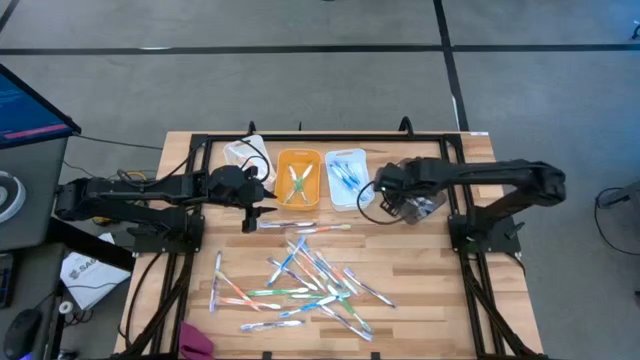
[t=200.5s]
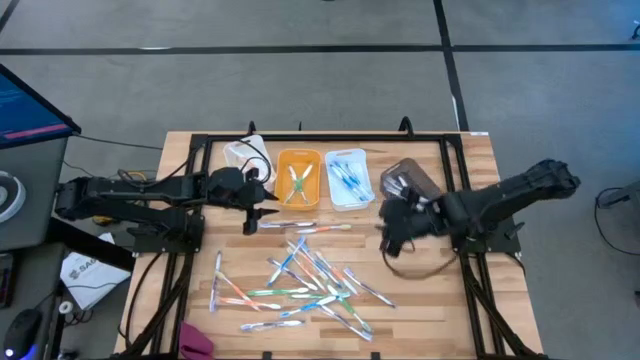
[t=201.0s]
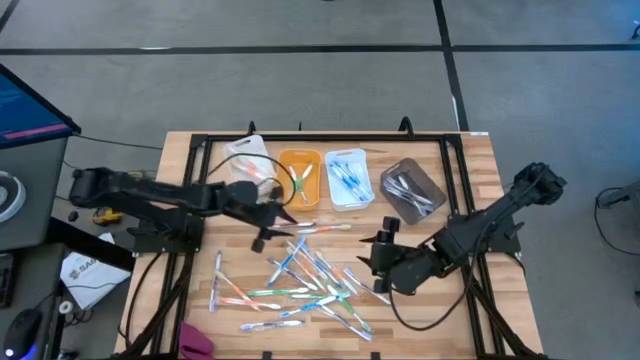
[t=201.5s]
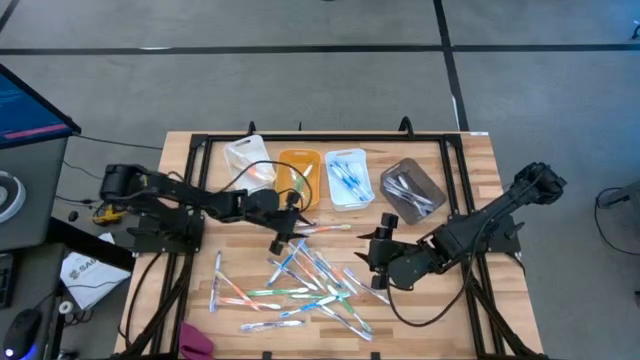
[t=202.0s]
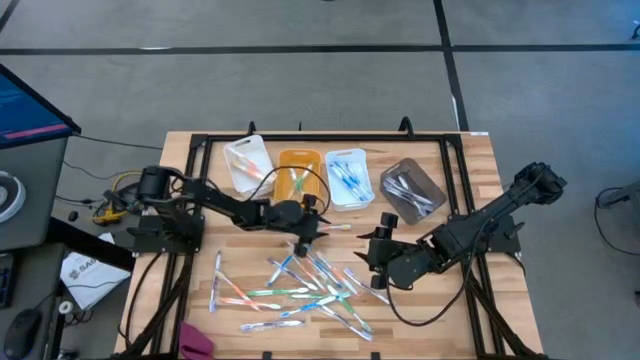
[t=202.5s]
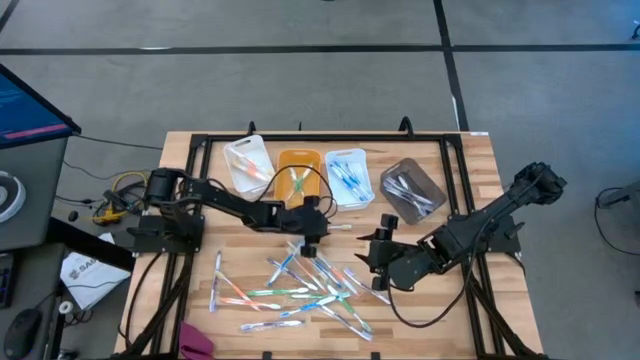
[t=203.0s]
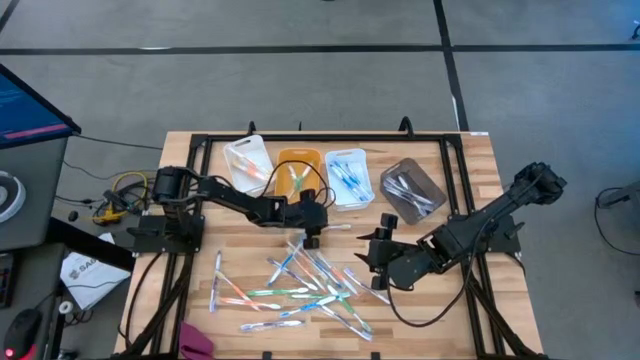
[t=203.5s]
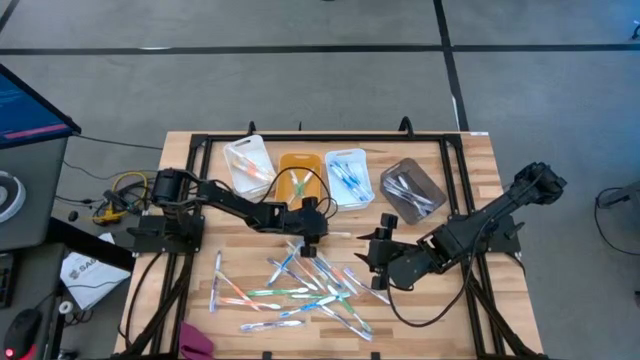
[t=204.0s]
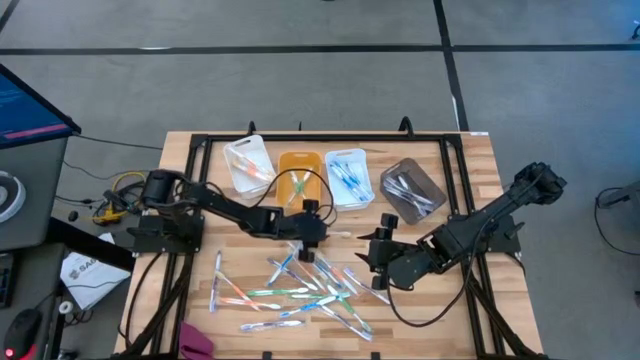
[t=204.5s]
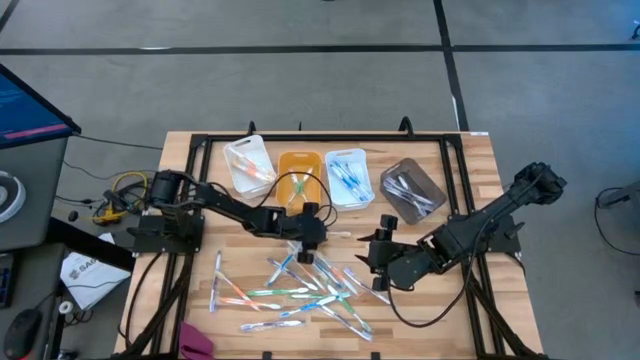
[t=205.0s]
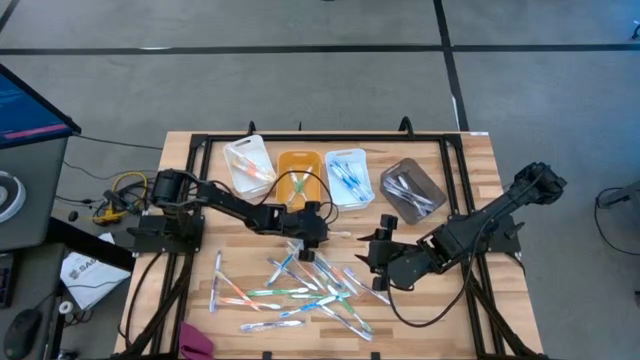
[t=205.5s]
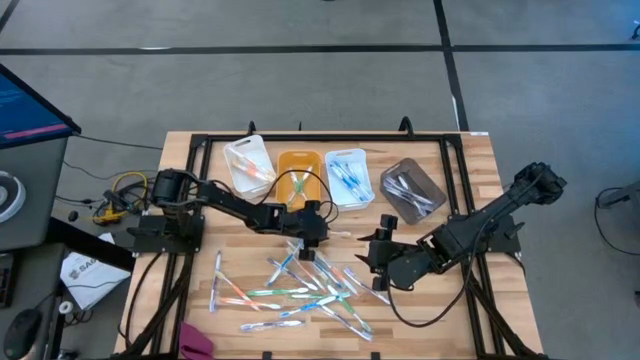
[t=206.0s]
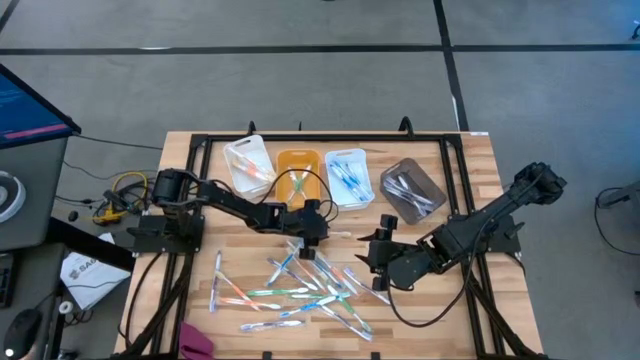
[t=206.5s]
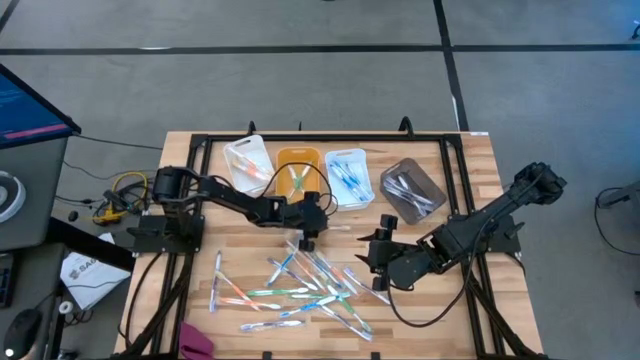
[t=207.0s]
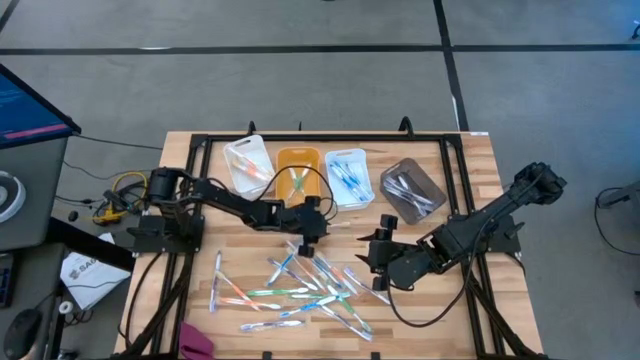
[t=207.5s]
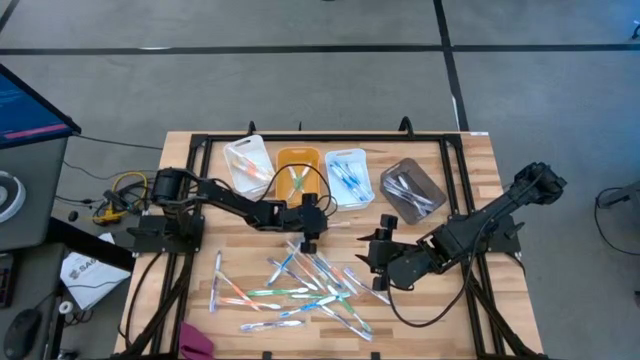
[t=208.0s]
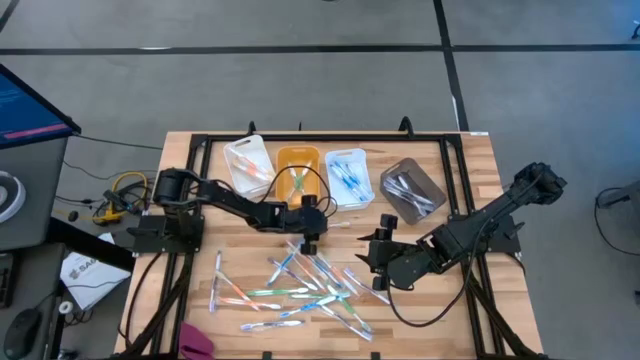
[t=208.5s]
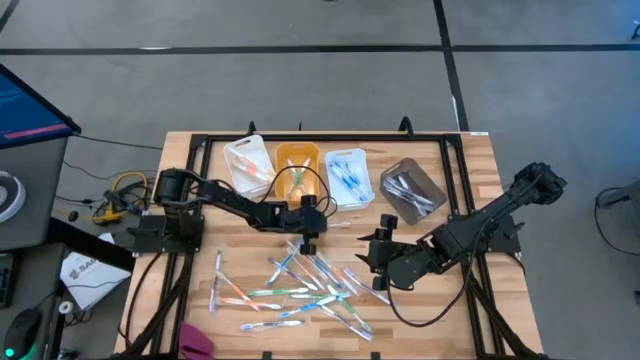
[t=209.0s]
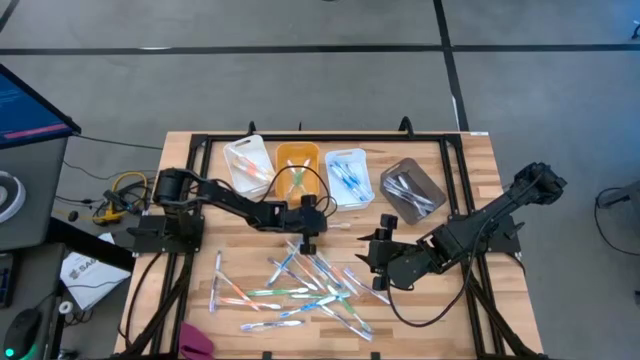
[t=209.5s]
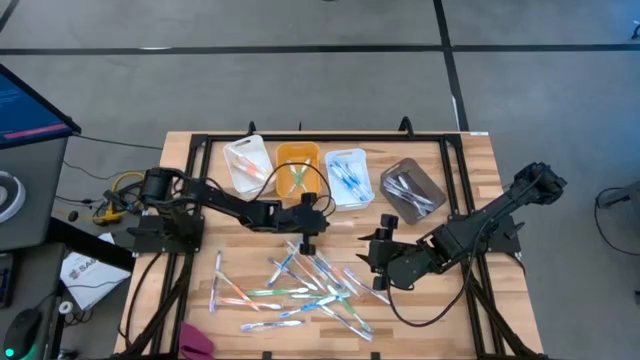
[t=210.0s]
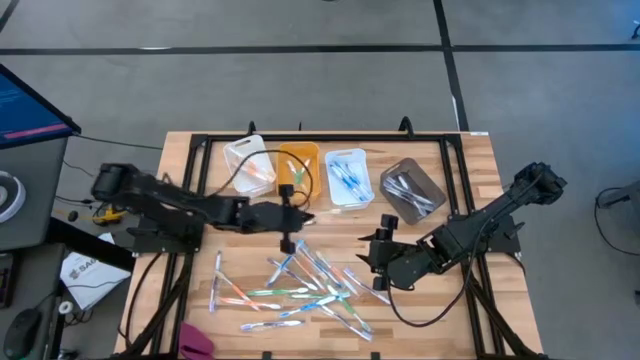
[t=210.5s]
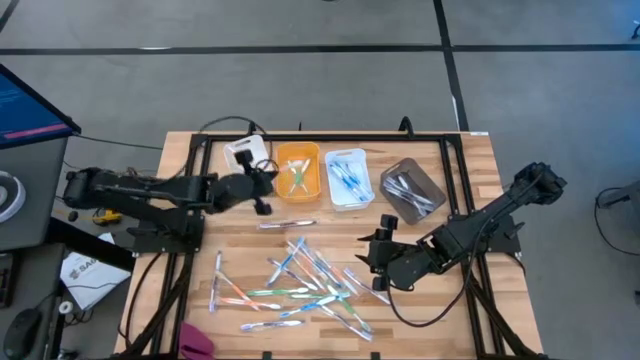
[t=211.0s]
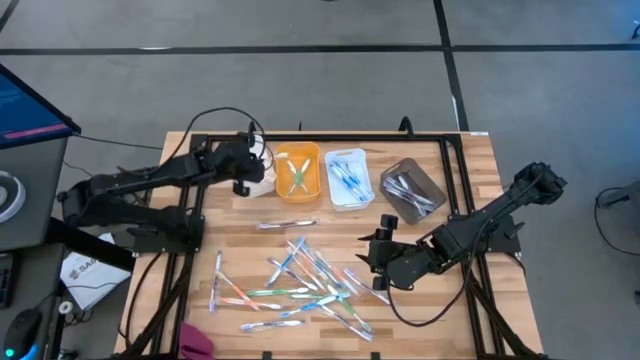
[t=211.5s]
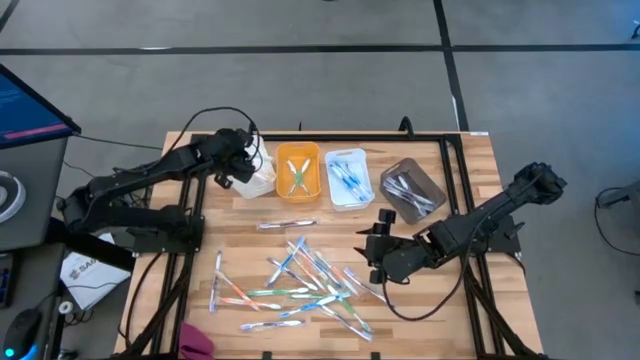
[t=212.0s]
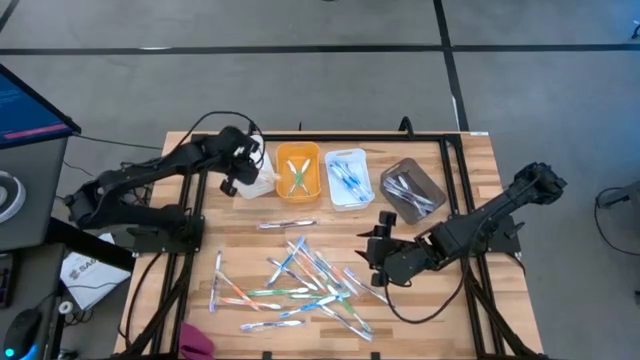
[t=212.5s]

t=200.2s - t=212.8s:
Task: Pick & Place Toothbrushes
Put the white orange toothbrush into the left white bin

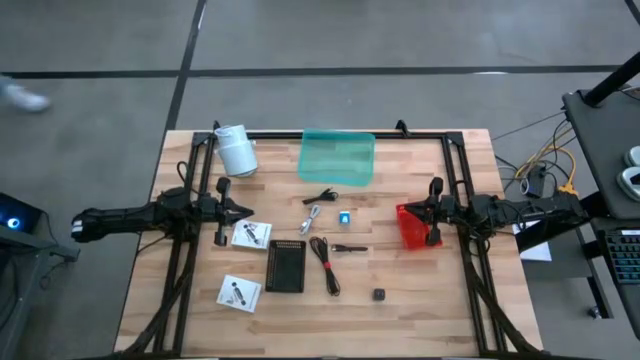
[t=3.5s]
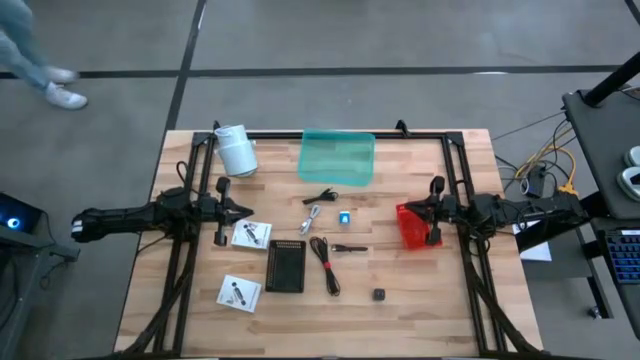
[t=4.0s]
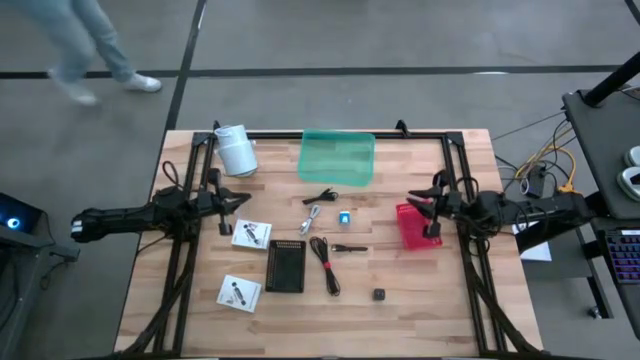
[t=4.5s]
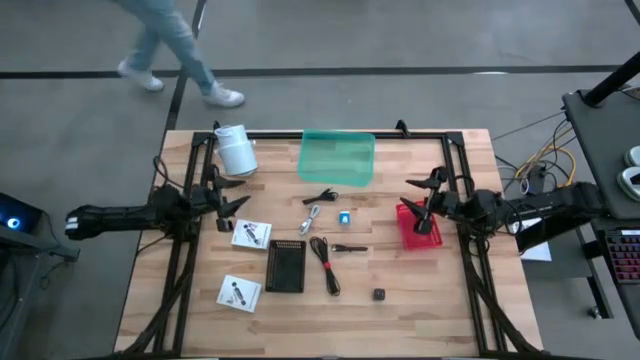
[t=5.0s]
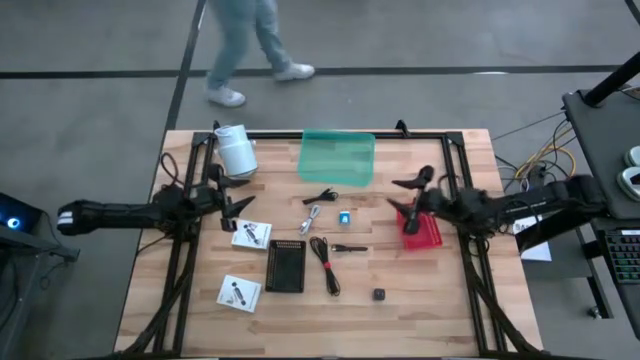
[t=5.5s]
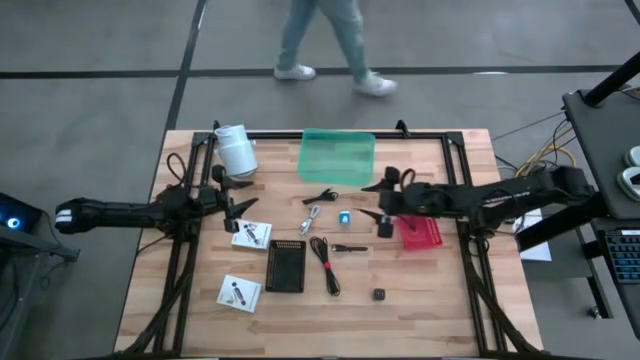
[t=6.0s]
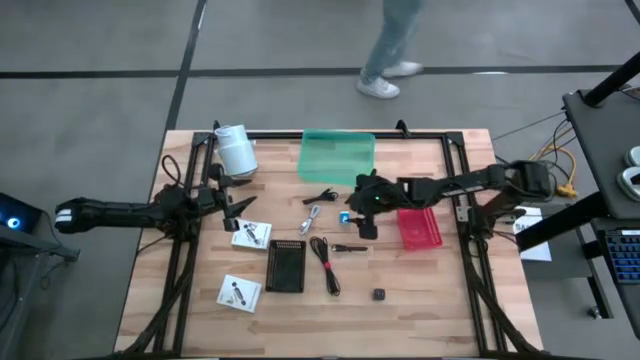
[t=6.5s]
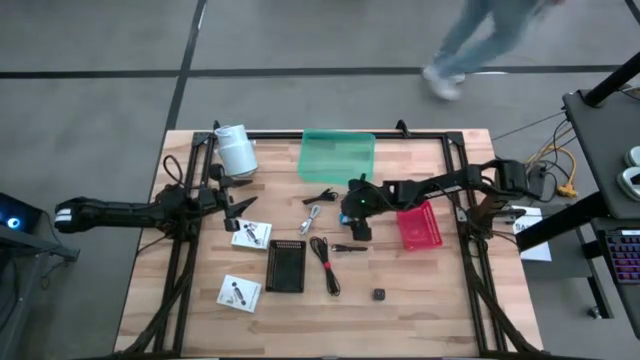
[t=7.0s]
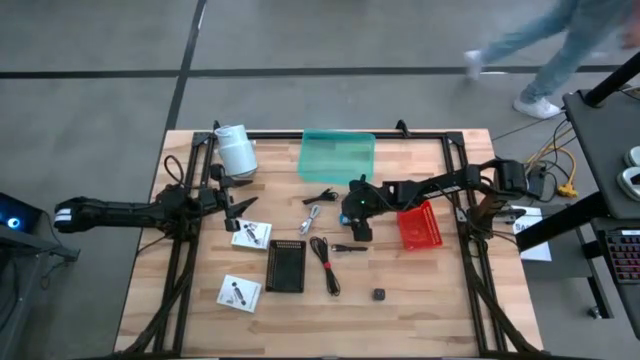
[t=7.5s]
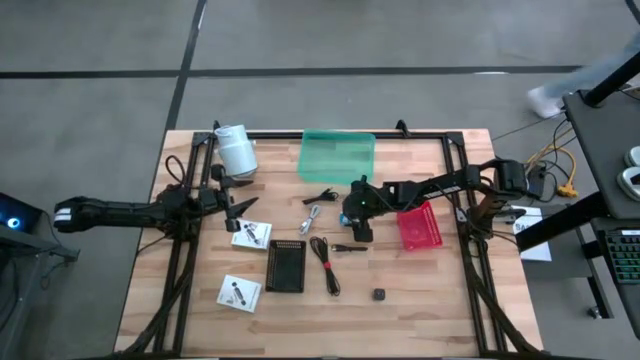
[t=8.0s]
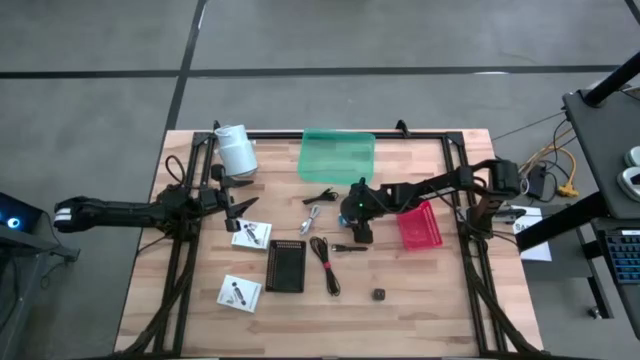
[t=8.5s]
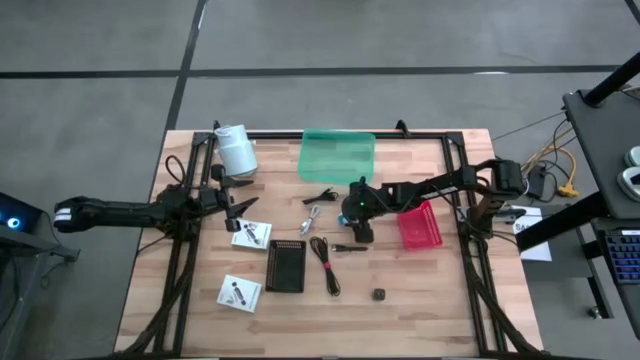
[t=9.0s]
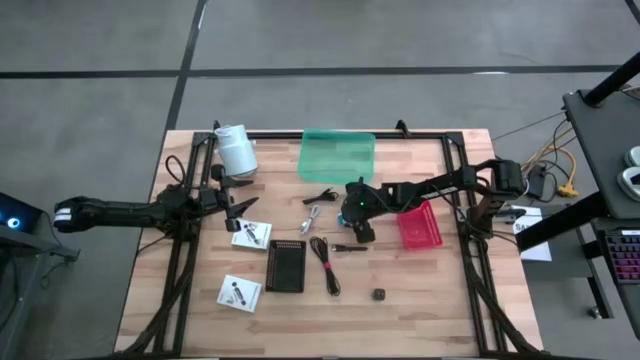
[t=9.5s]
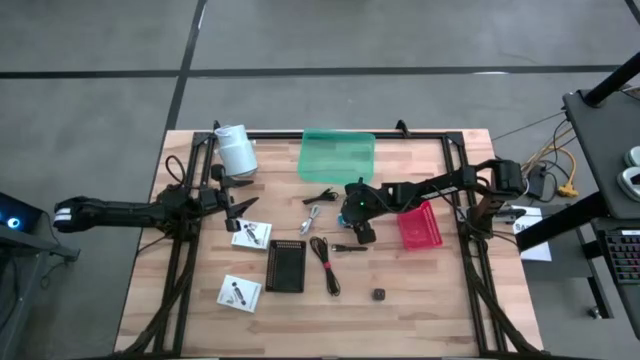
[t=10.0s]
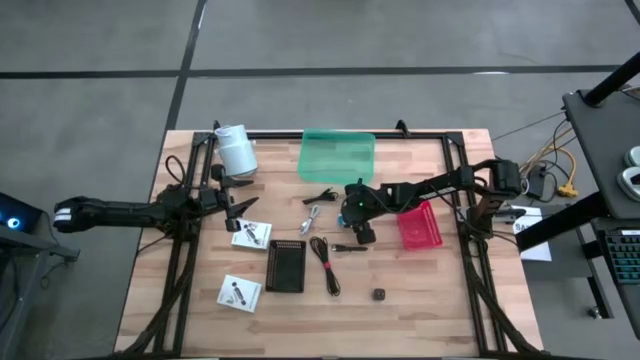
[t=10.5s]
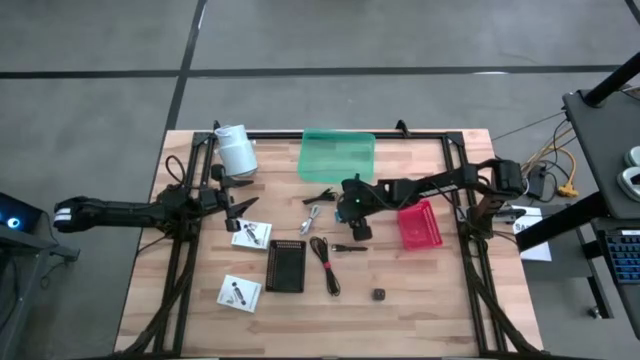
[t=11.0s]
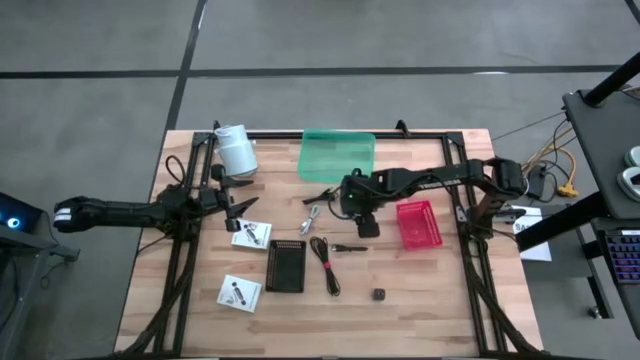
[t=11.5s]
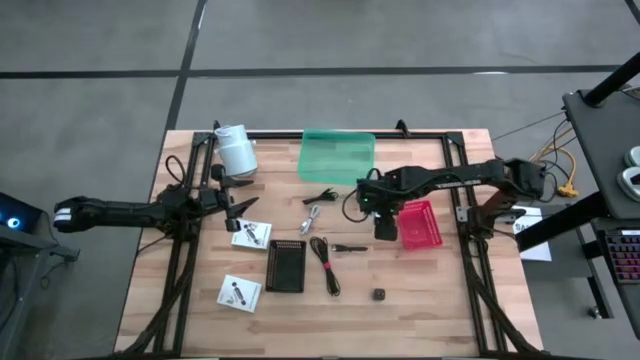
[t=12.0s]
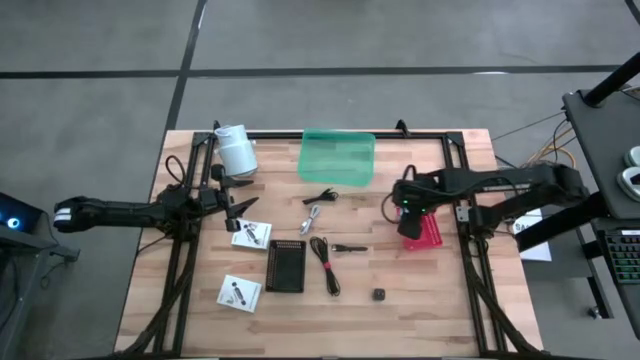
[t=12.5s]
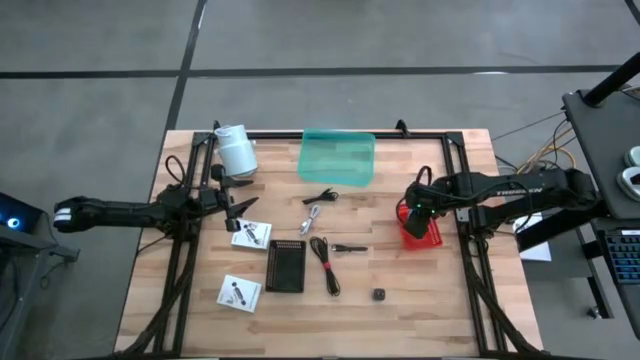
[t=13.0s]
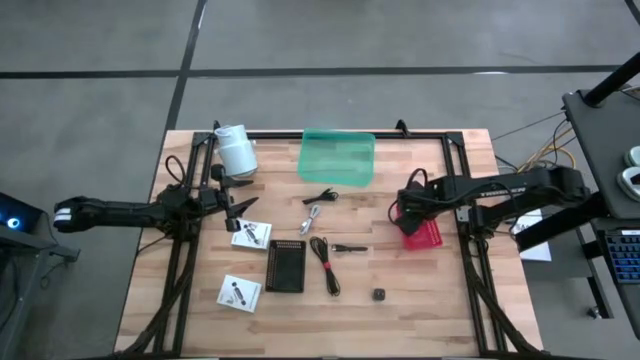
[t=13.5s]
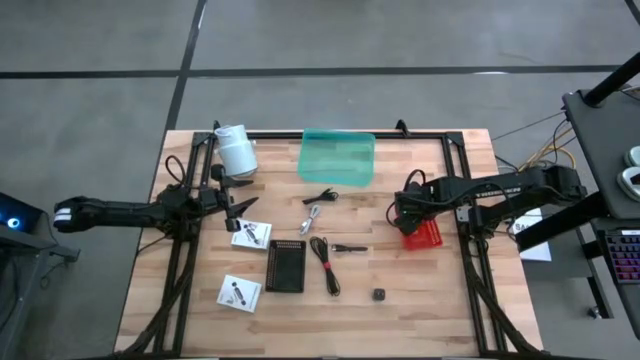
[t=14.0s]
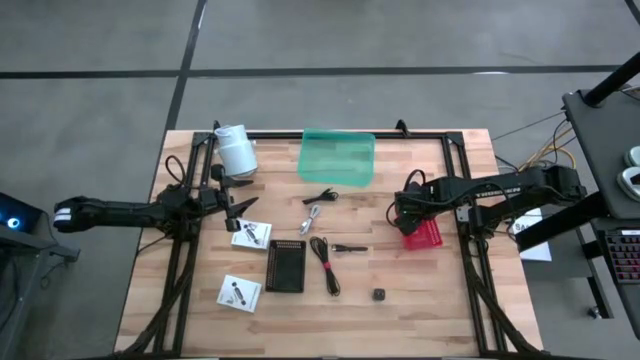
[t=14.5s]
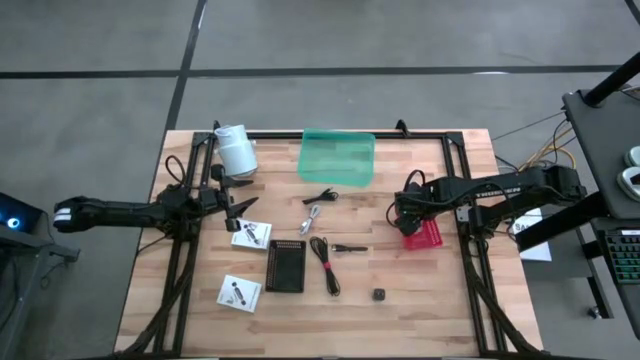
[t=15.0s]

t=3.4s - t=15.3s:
Task: Pick and place items into bin
Put the blue charger adapter into the red bin
